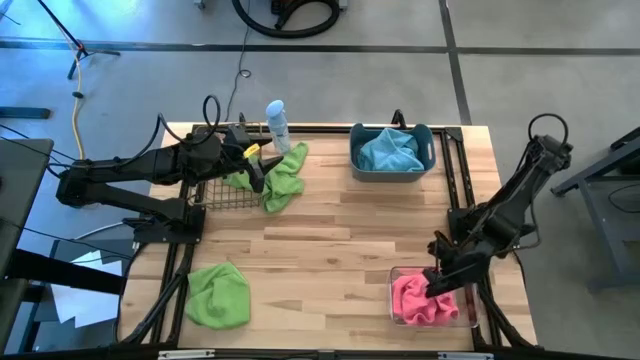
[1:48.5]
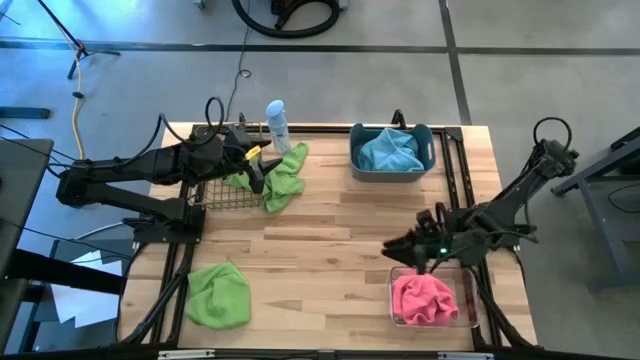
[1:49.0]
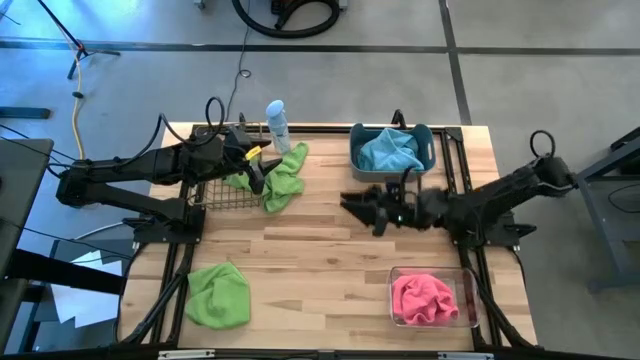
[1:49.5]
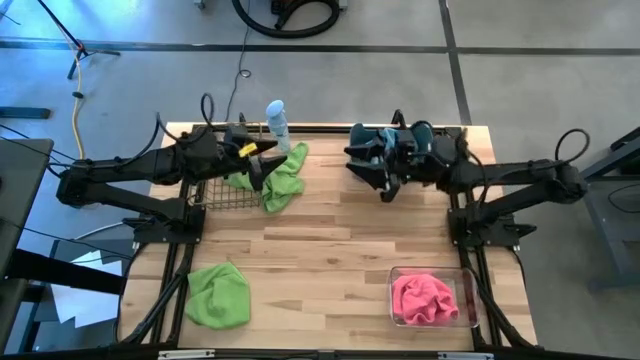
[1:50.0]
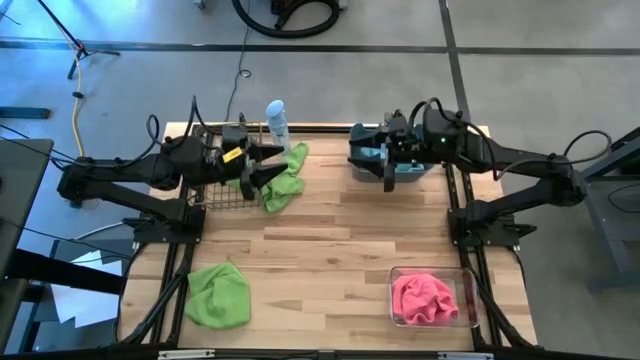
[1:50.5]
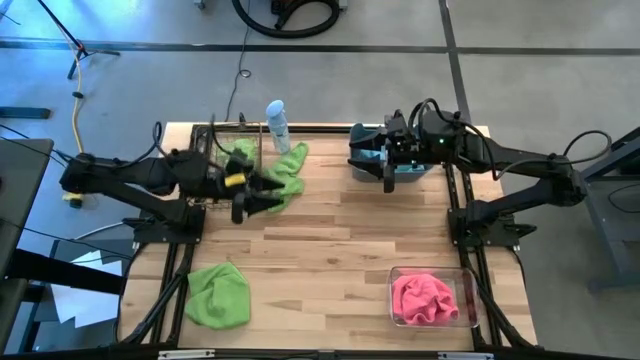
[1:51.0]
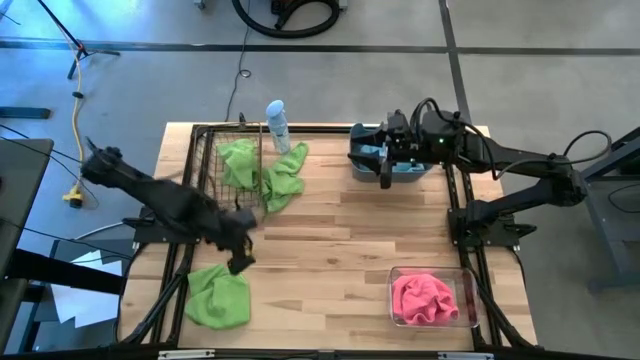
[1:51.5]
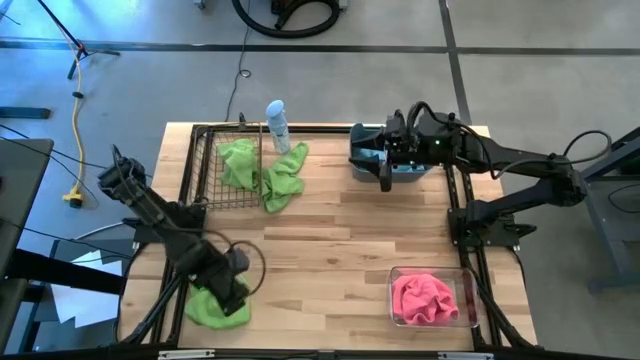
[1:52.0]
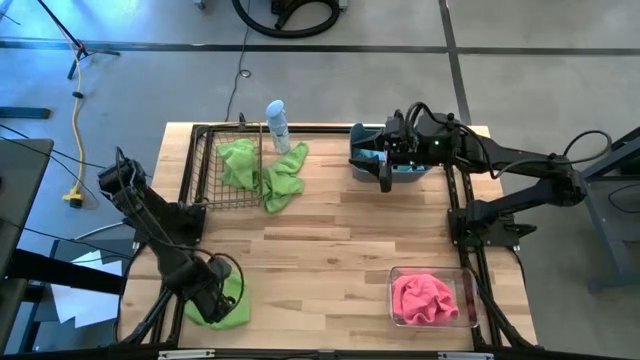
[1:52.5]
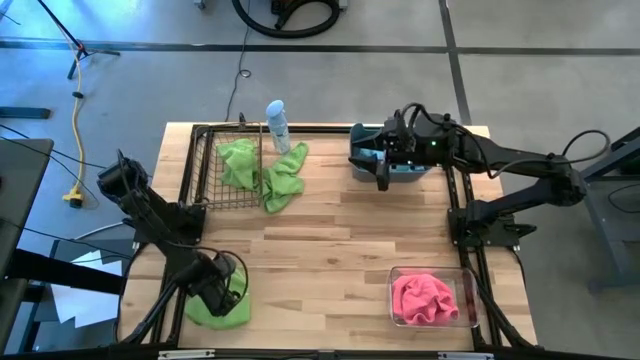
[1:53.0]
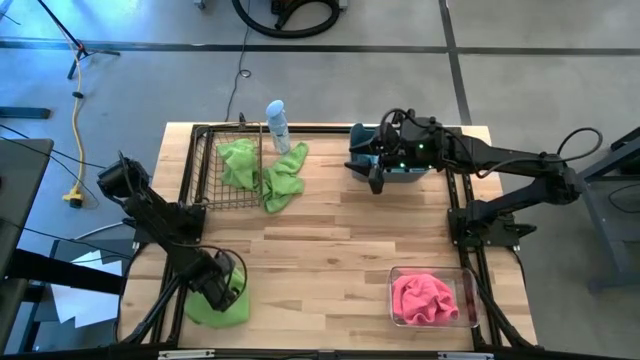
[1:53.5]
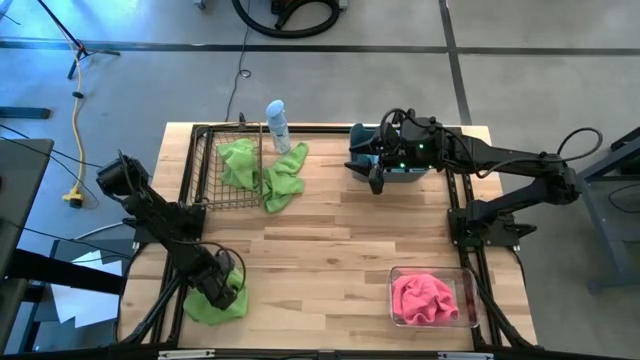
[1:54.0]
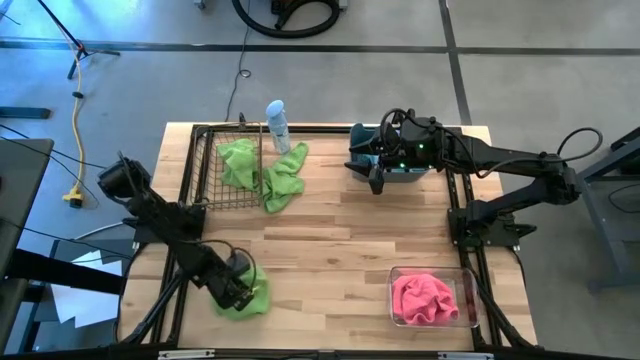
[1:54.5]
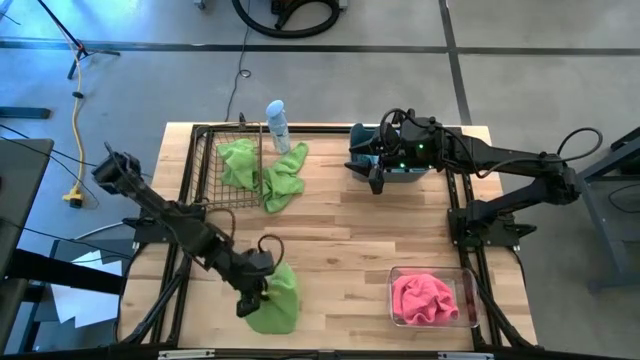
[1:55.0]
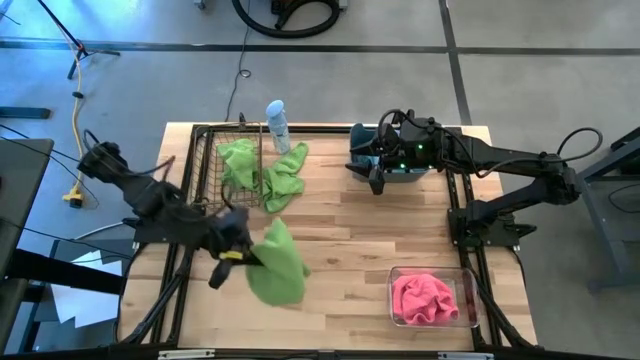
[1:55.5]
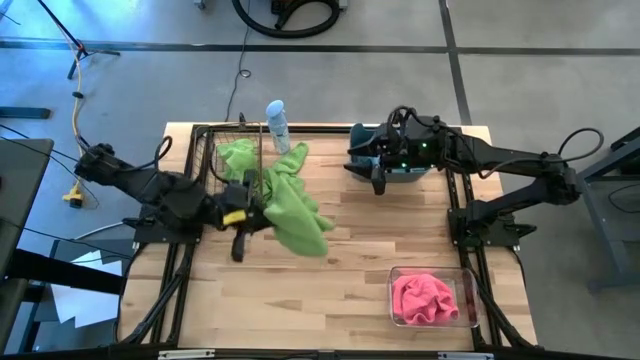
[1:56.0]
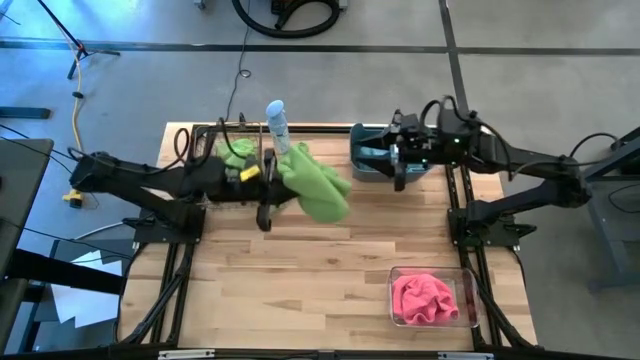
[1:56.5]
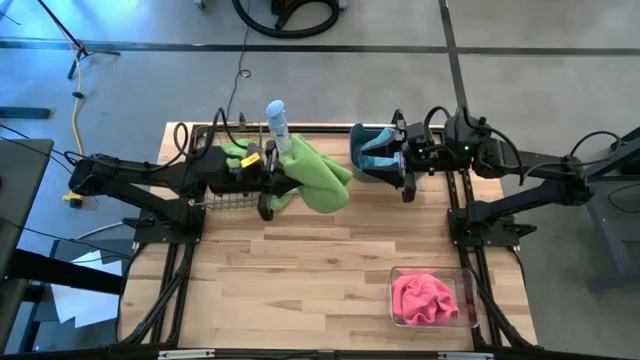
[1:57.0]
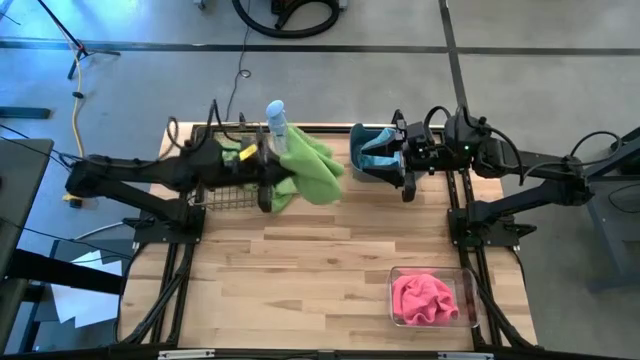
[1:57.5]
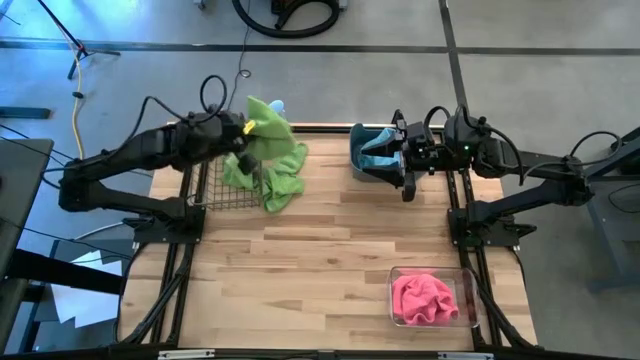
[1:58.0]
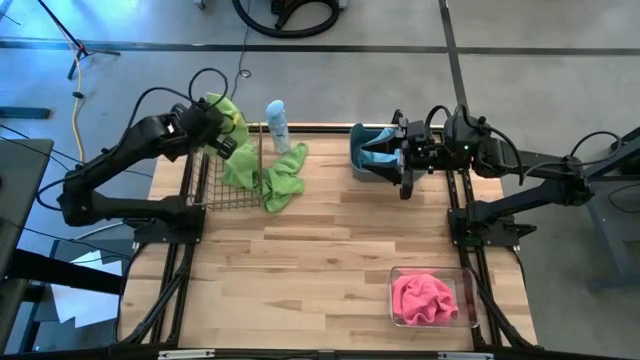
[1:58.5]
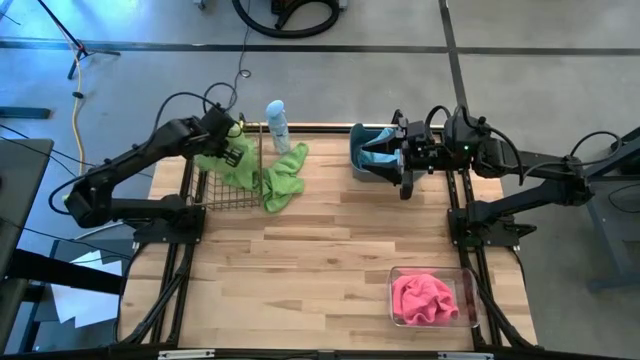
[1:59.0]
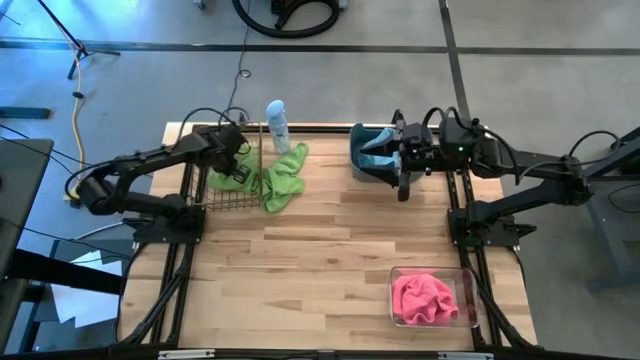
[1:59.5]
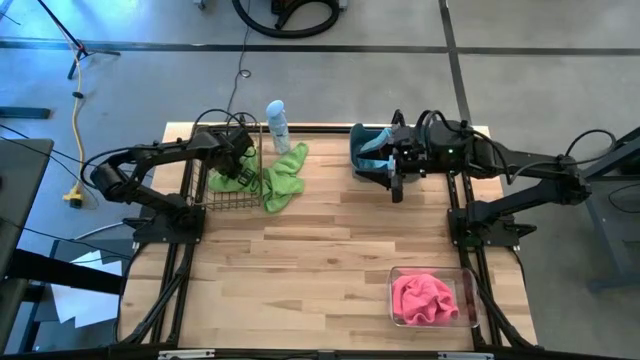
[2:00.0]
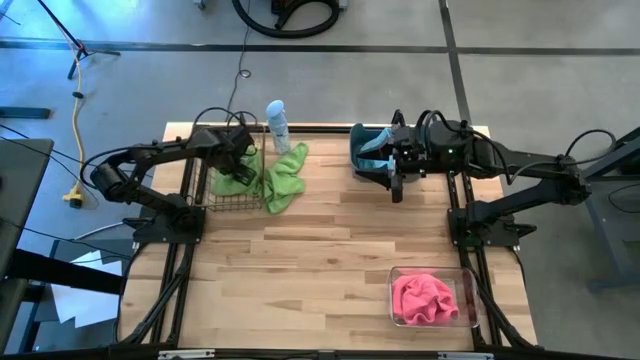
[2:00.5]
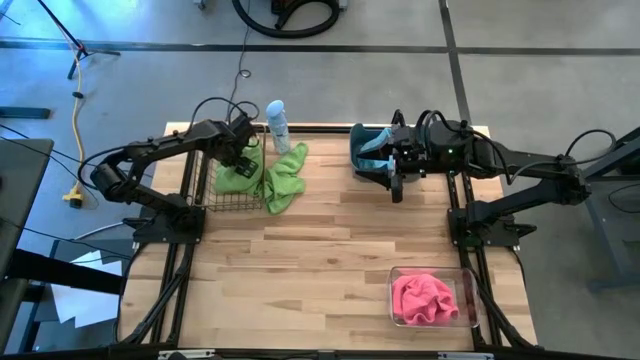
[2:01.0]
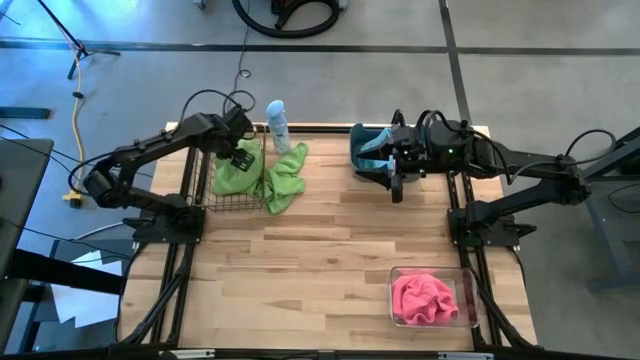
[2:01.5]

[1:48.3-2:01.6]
Task: Sort microfiber towel by color & place in baskets
Put the bottom green towel into the wire basket

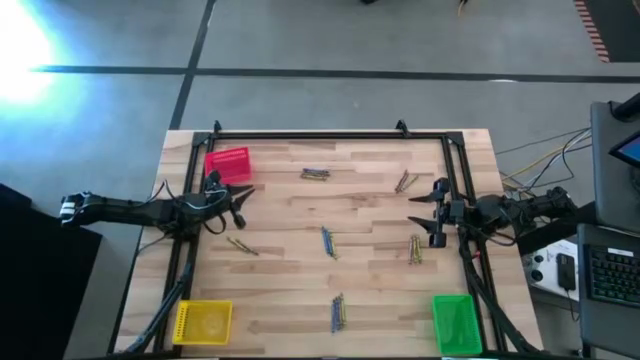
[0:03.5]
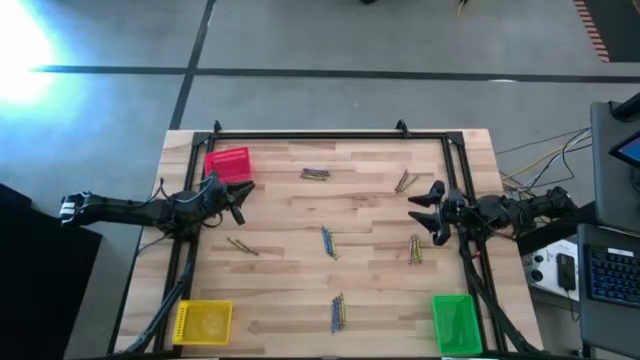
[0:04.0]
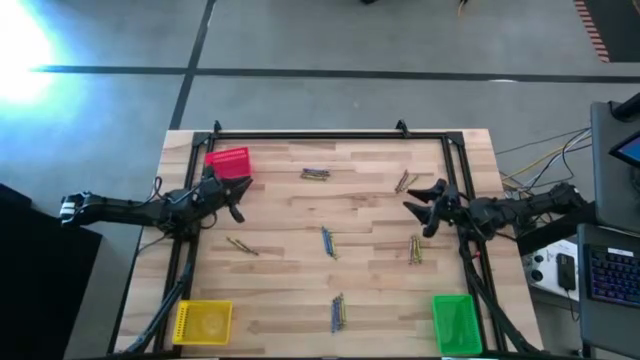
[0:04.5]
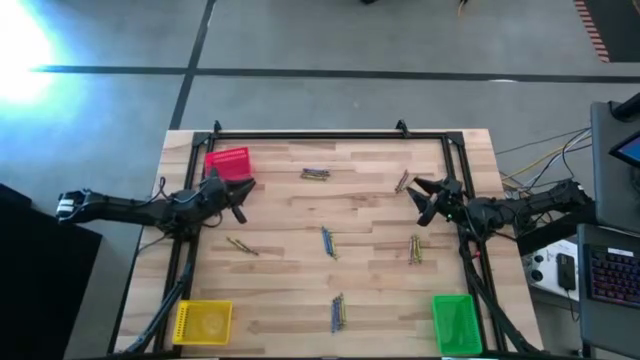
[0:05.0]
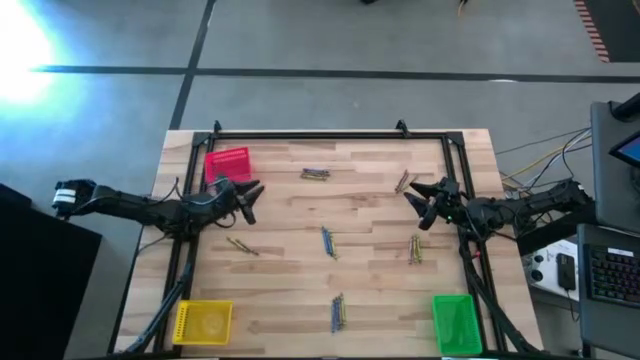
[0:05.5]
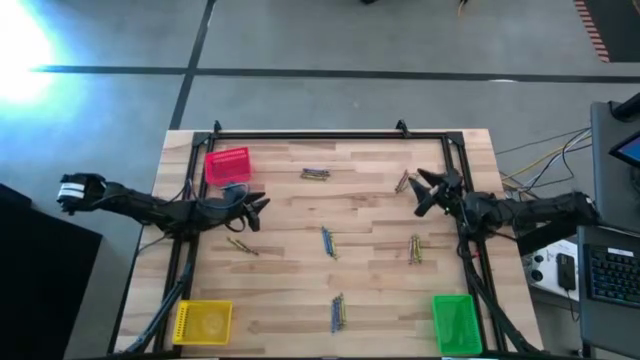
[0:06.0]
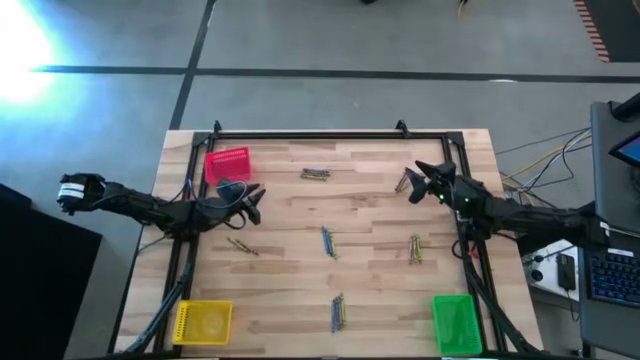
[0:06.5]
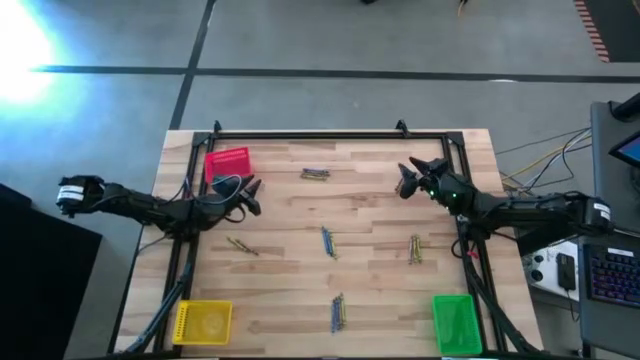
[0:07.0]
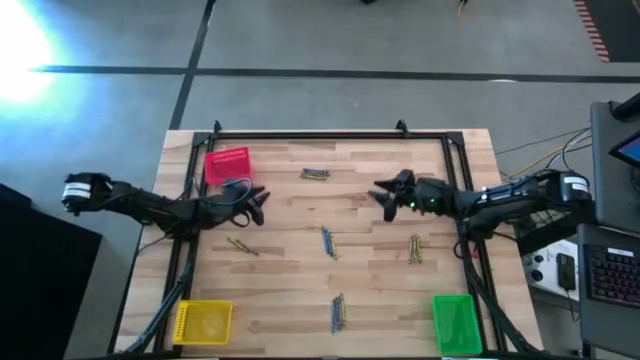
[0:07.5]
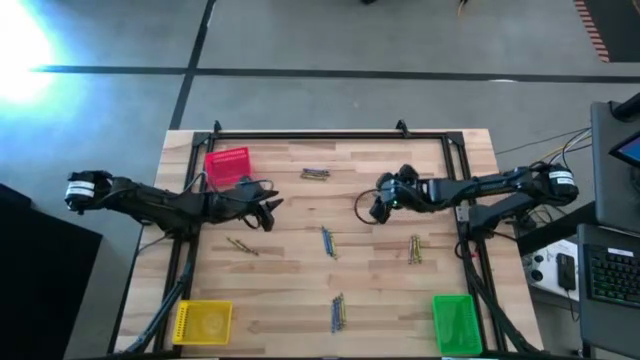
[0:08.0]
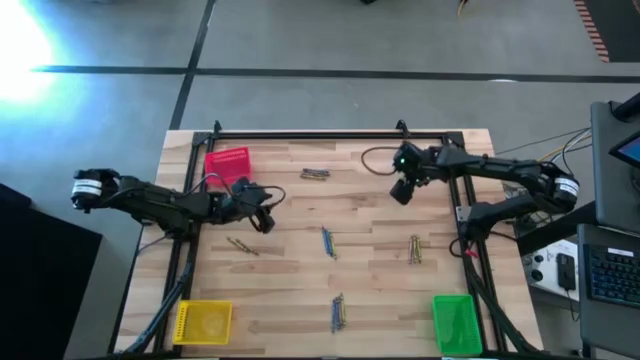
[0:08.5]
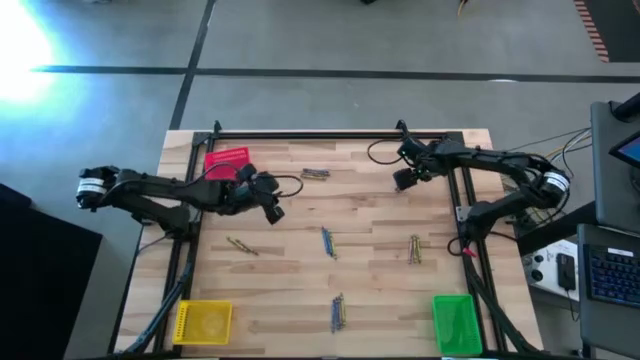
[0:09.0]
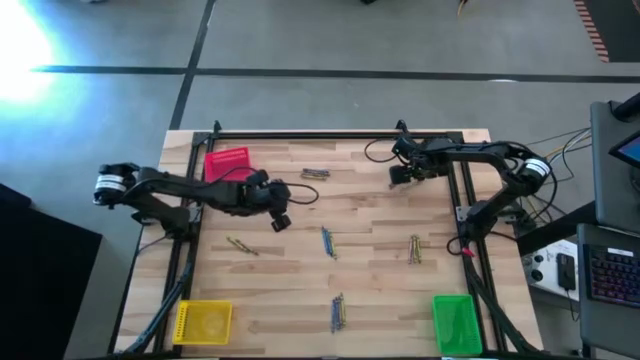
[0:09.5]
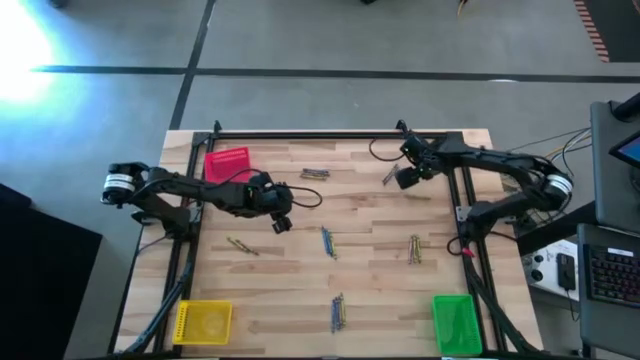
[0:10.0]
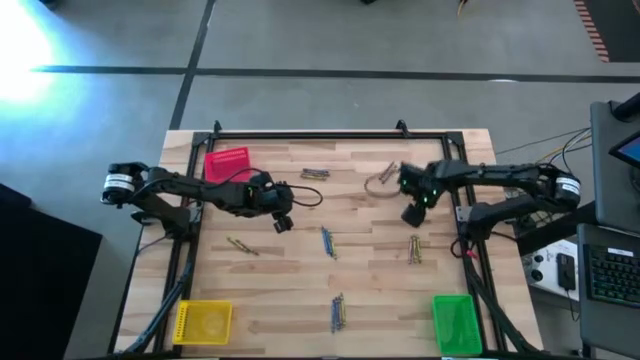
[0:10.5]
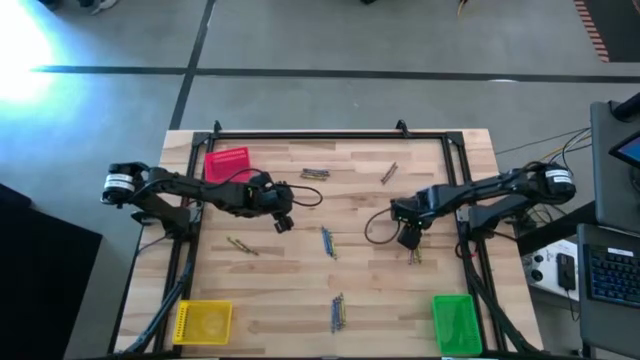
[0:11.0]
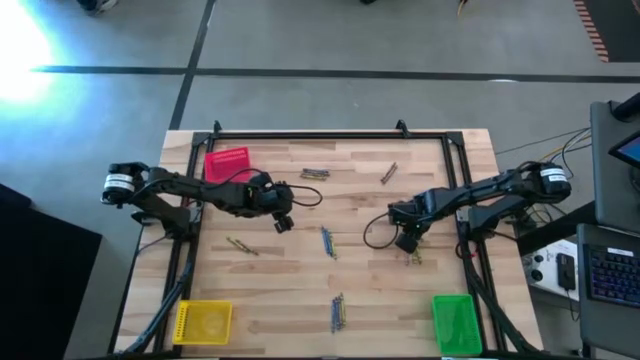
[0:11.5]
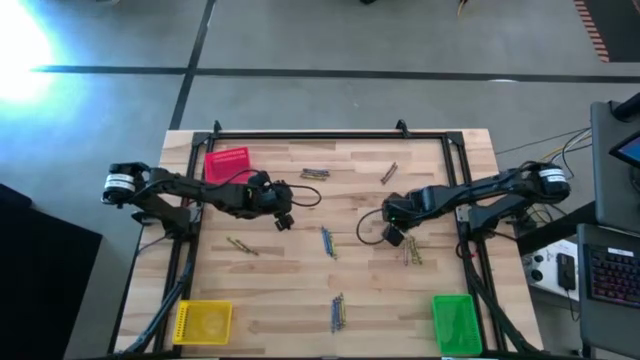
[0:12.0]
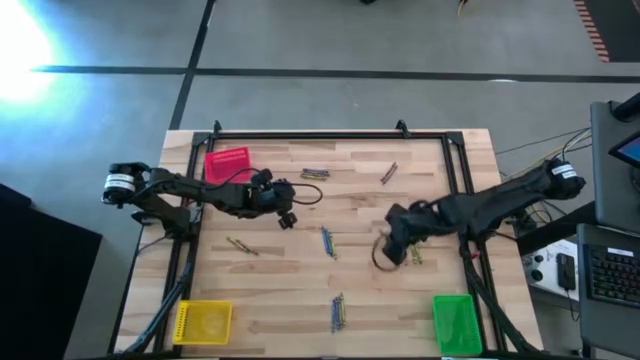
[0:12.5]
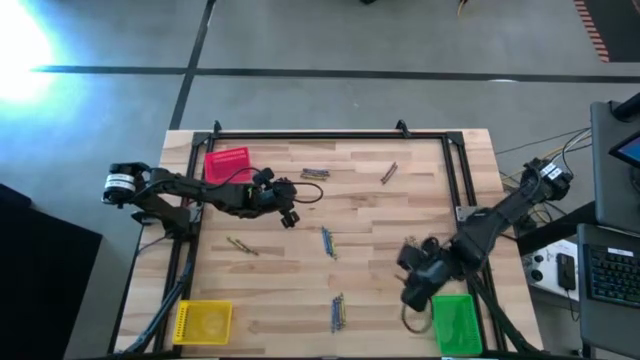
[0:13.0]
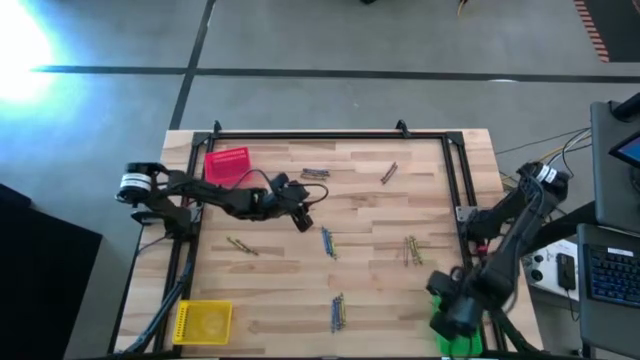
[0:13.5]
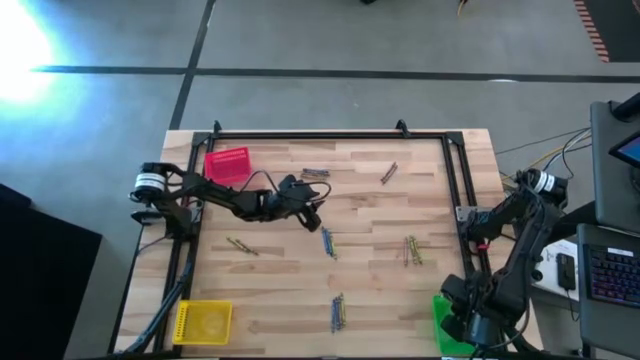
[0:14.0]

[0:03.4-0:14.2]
Task: Sort crayons
Put the green crayon into the green bin
